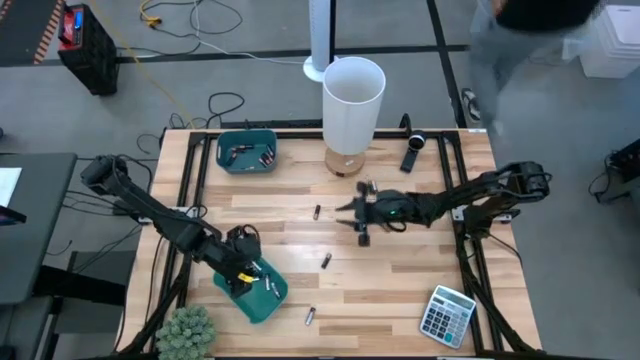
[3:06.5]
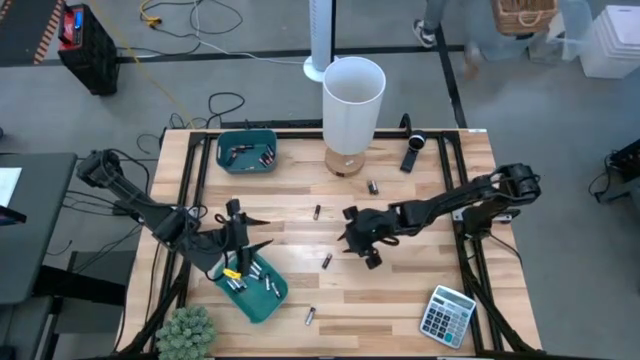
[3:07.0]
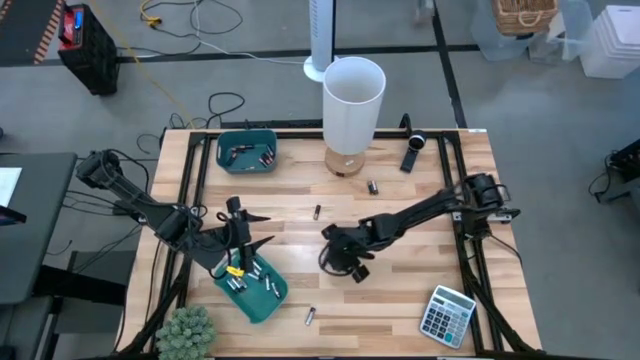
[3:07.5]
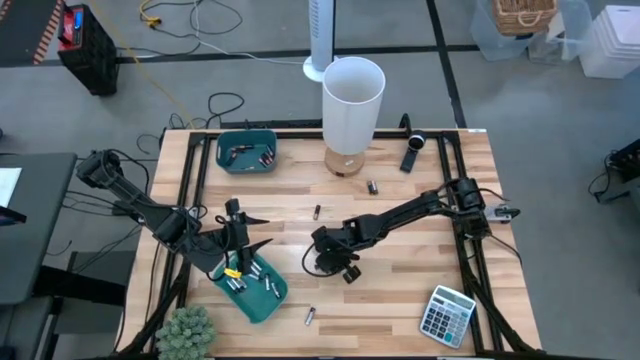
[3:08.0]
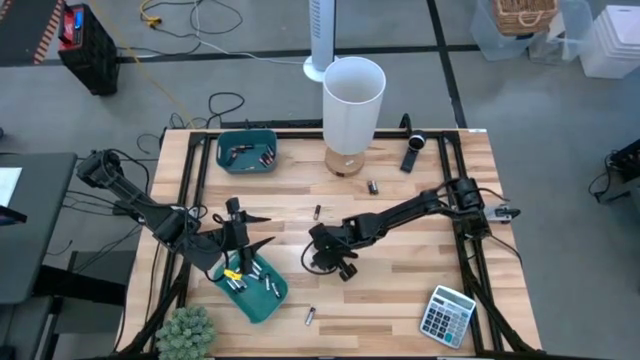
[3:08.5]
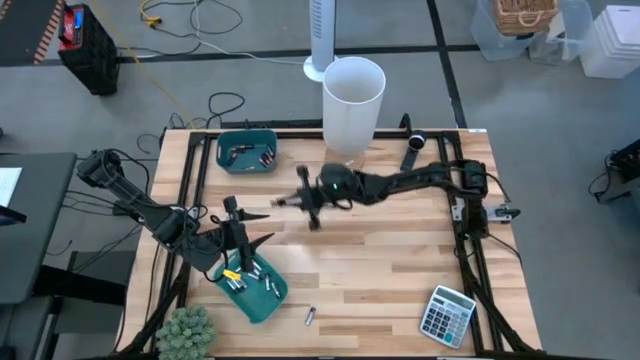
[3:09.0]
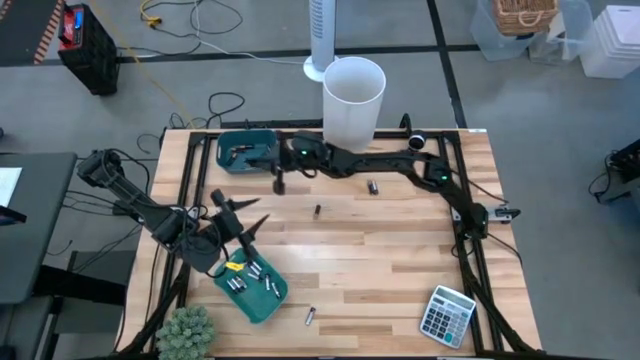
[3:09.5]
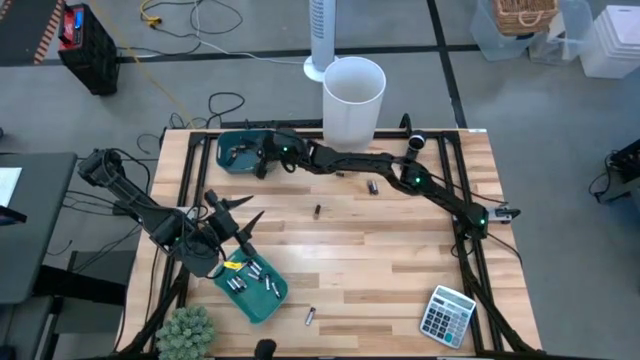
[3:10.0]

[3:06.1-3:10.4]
Task: Sort batteries
Put the black battery into the blue bin

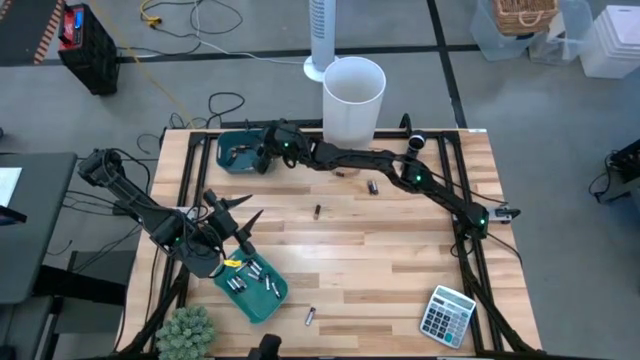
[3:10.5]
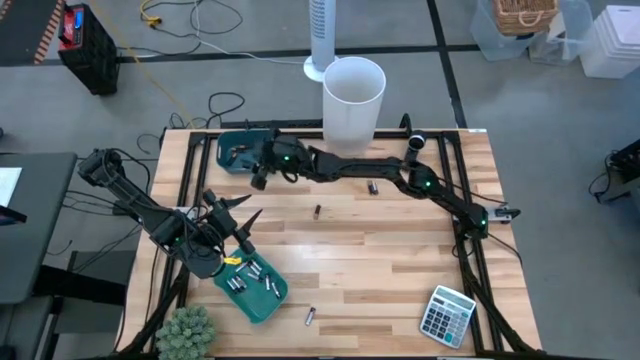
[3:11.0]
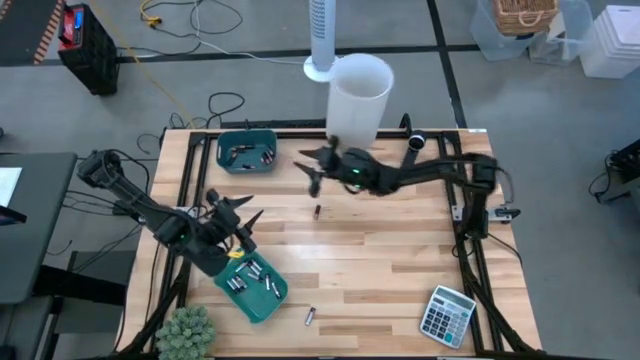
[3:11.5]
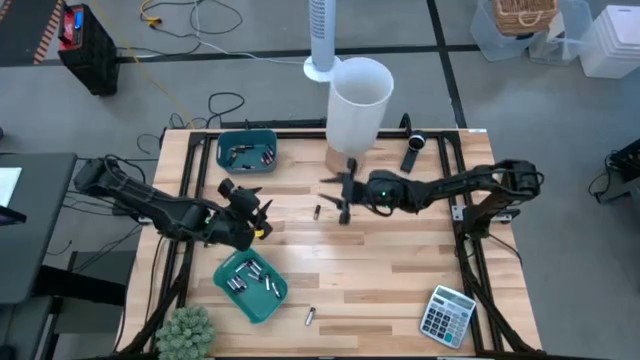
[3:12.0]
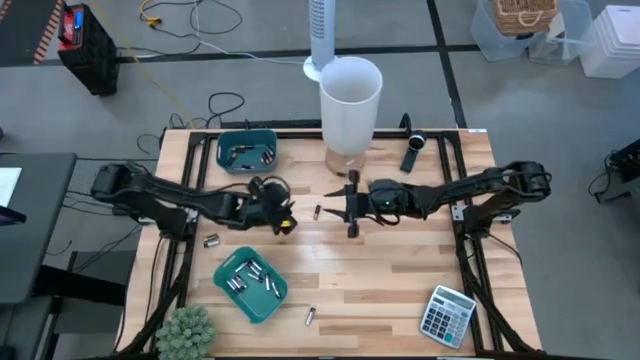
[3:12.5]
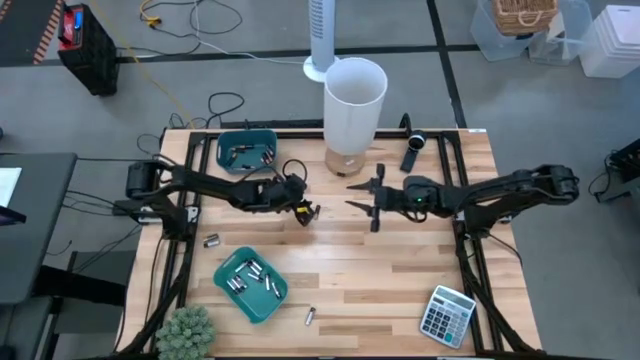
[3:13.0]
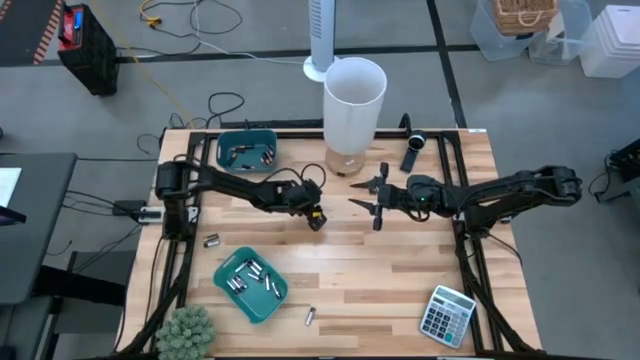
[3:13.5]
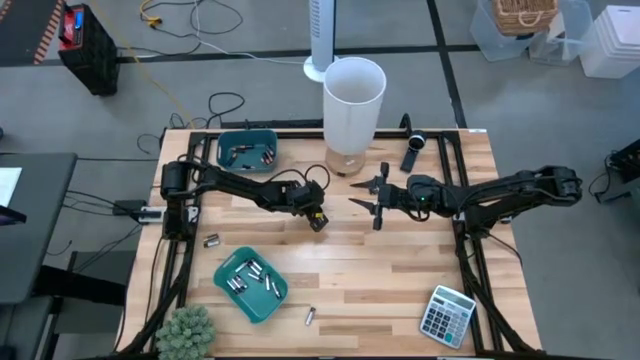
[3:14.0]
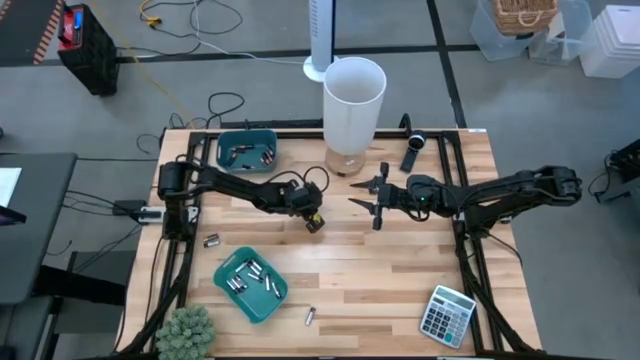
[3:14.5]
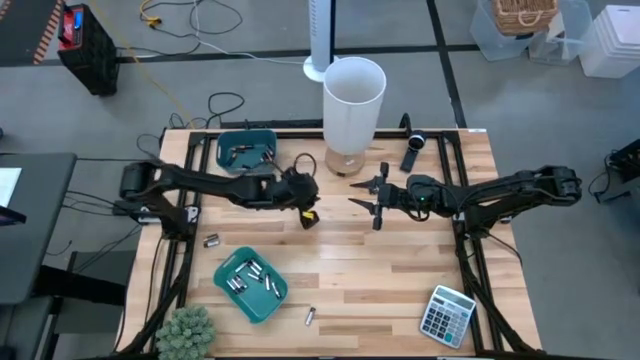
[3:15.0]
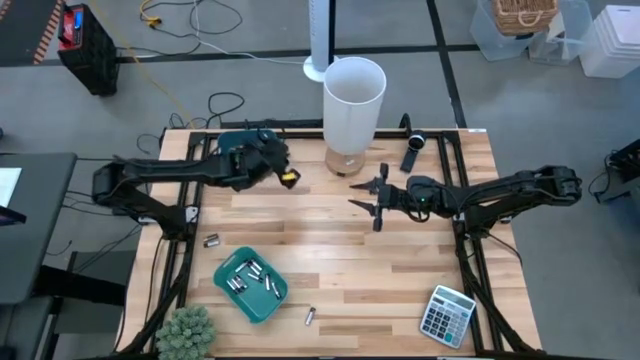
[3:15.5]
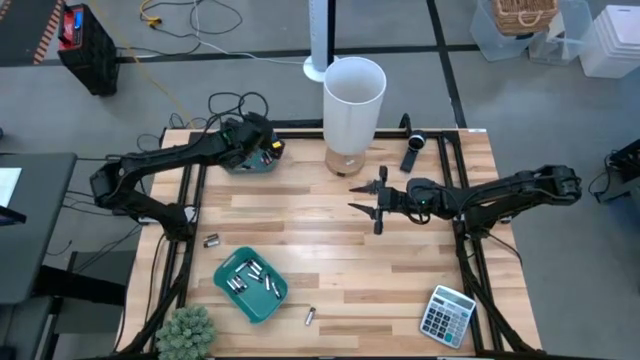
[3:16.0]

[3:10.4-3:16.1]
Put the black battery into the blue bin

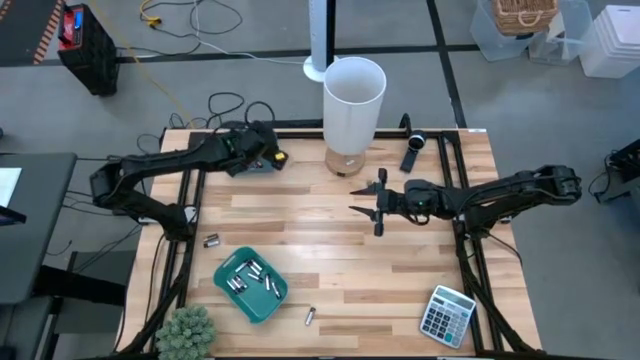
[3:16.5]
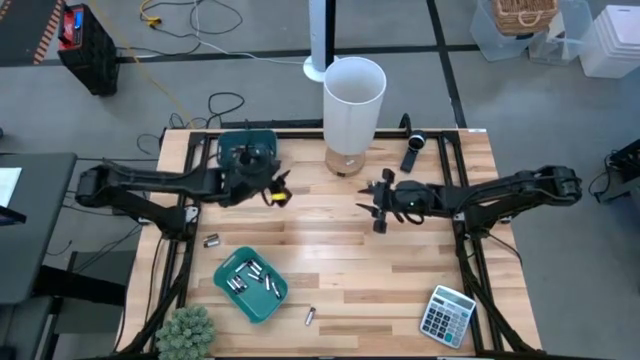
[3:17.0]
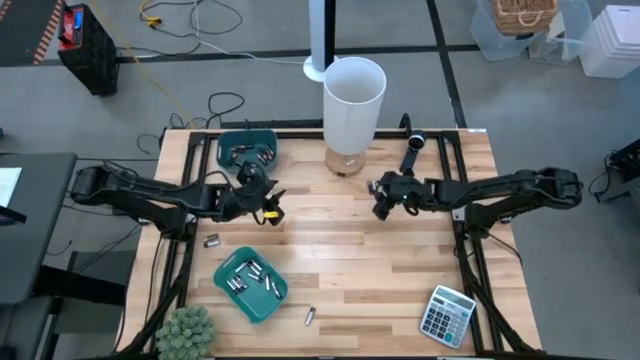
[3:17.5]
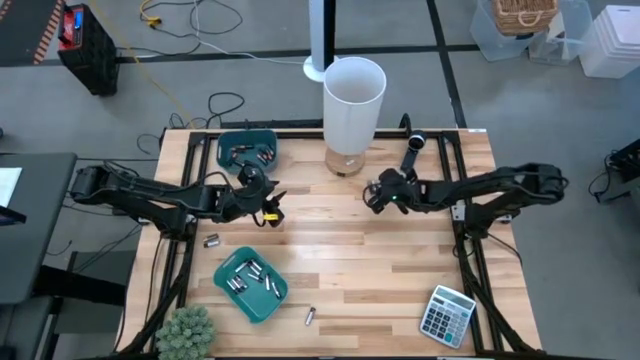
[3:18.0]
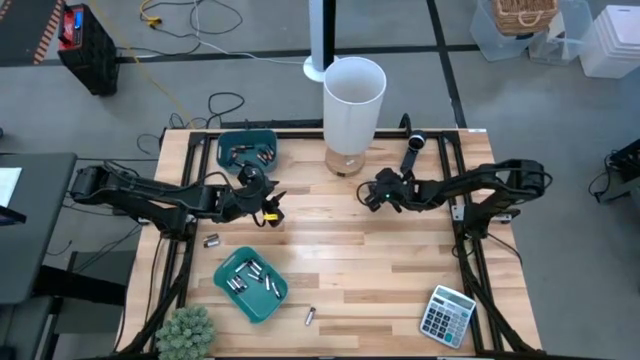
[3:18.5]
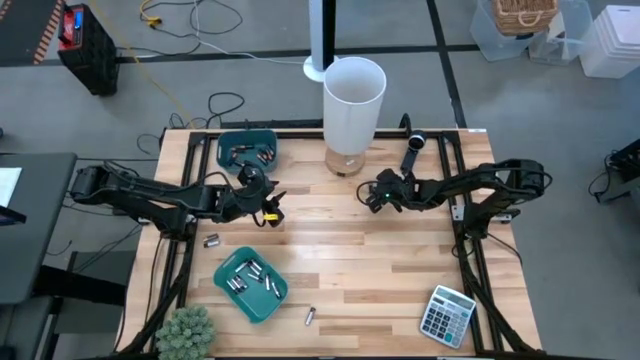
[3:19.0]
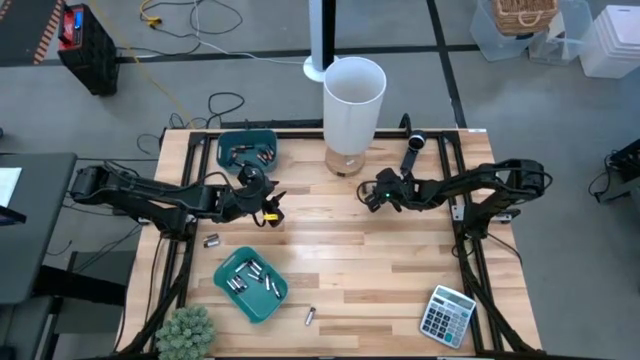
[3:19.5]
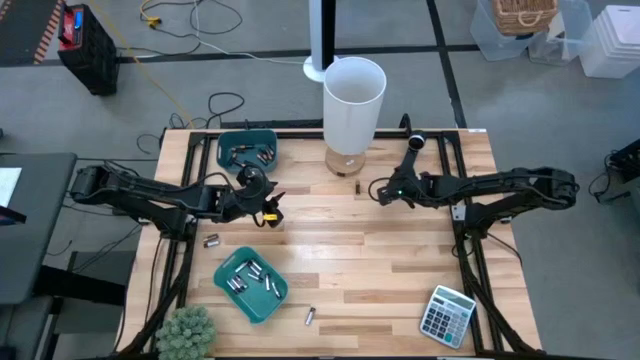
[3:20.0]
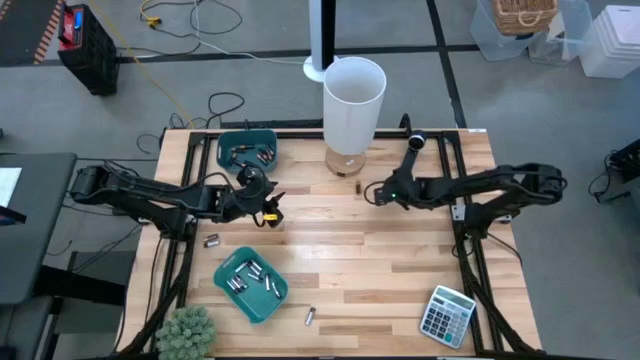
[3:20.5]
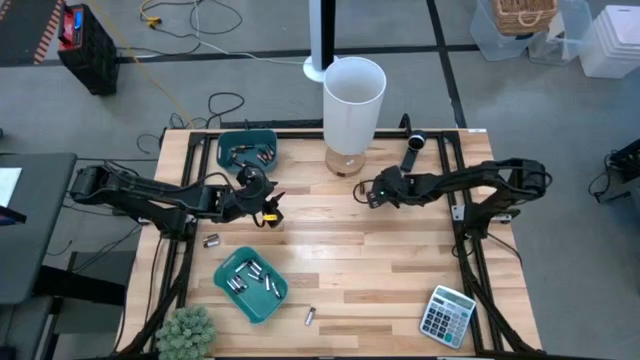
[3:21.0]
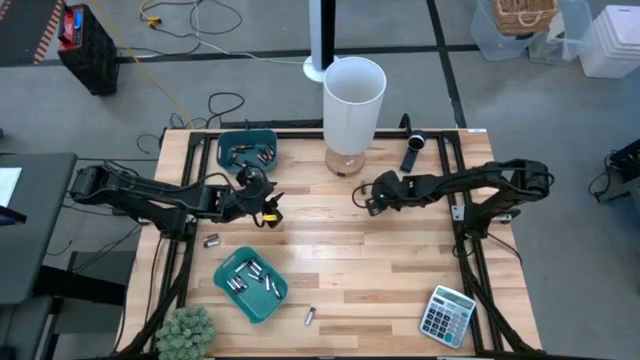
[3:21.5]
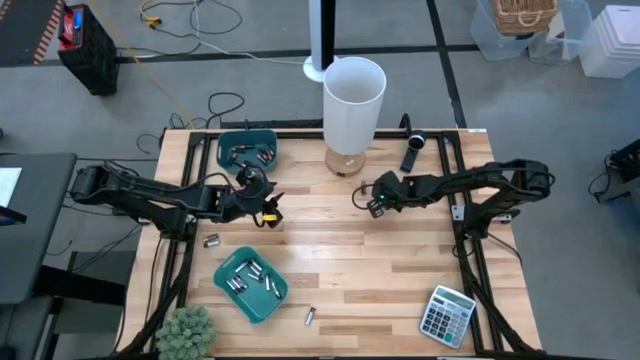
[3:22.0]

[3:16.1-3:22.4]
Put the silver battery into the green bin

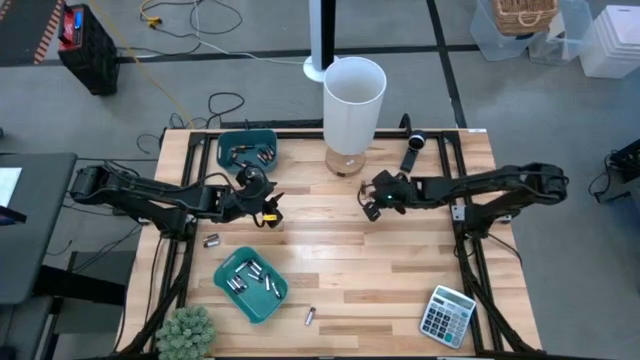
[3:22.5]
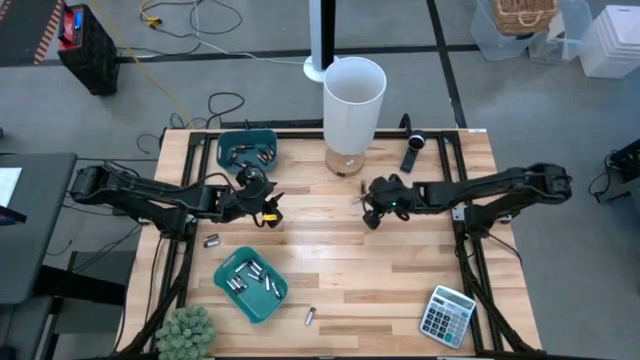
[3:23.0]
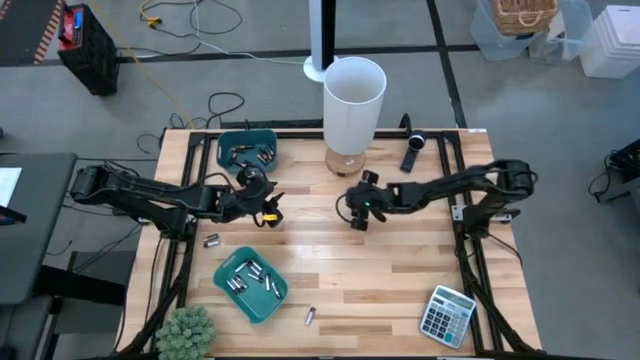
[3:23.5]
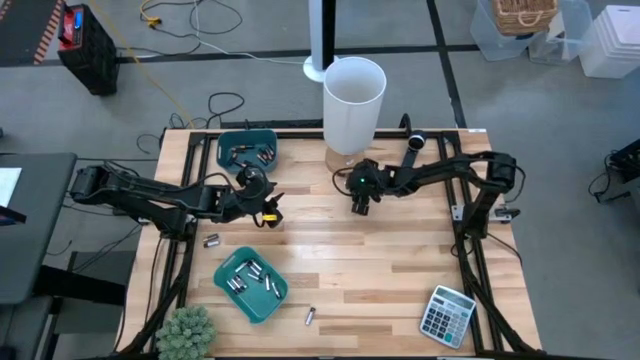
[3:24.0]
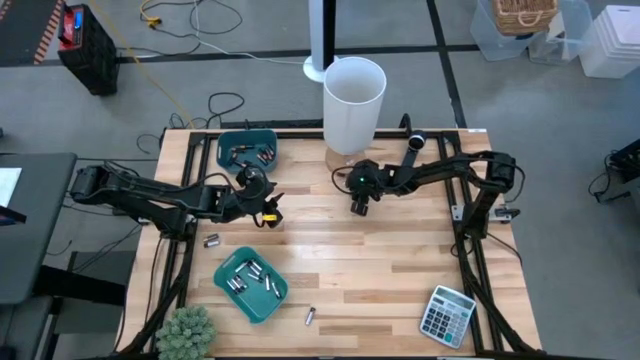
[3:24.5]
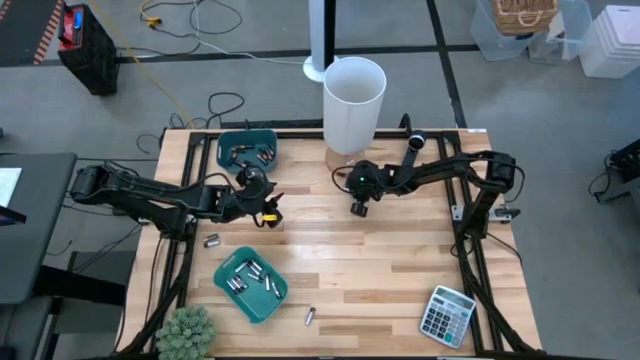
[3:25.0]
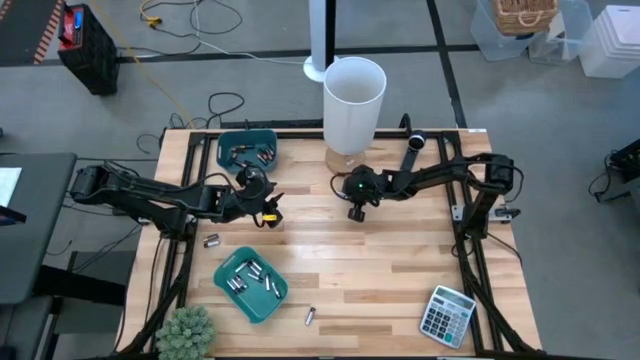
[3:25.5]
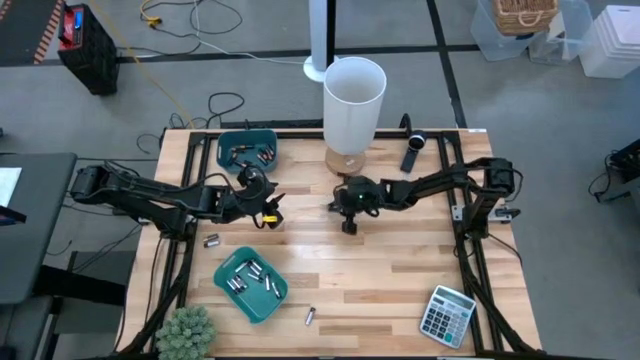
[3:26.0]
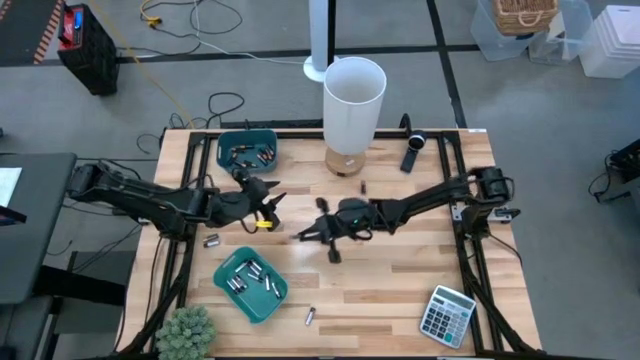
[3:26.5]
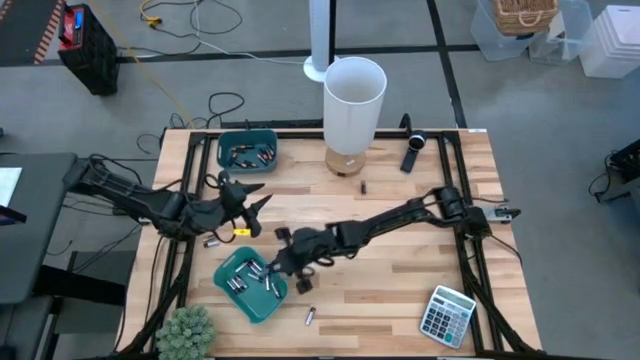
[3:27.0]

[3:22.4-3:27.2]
Put the silver battery into the green bin

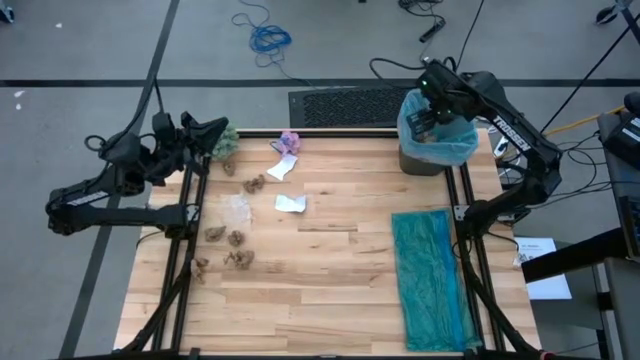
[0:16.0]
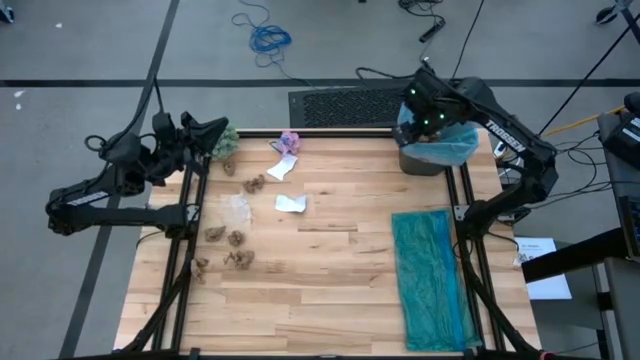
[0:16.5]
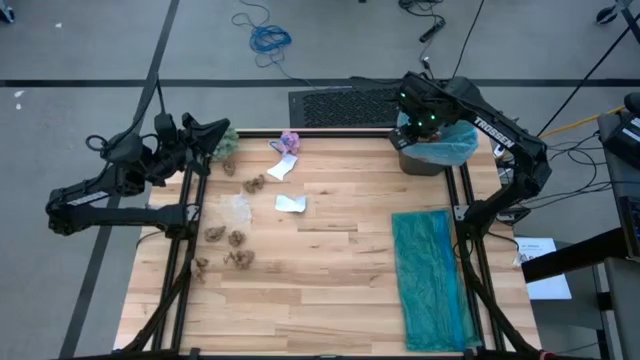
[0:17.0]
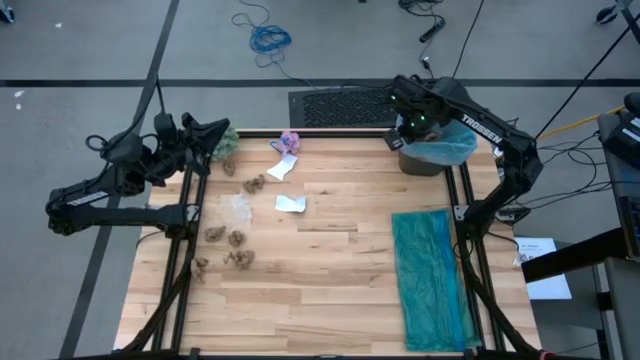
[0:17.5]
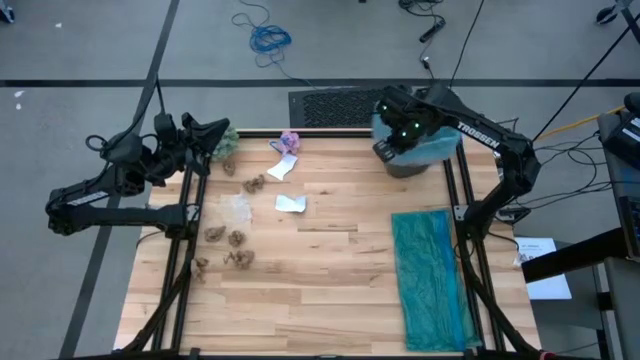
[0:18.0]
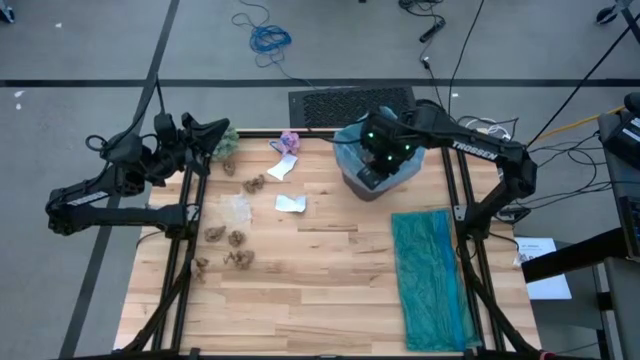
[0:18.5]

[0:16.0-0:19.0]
Task: place trash/remove bag and relplace
Move the black trash bin to the top center of the table
